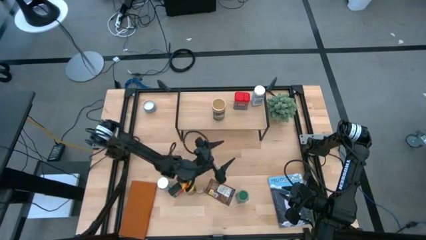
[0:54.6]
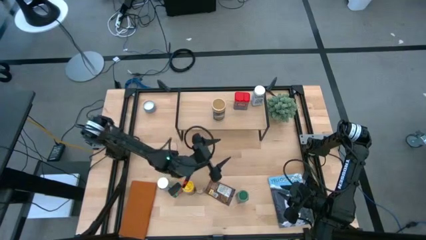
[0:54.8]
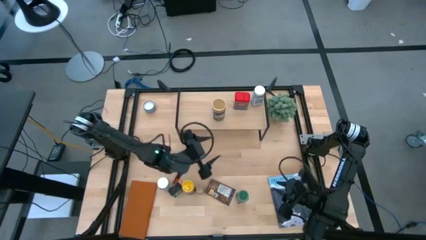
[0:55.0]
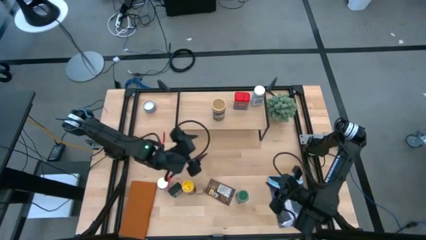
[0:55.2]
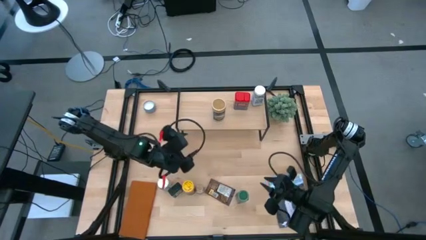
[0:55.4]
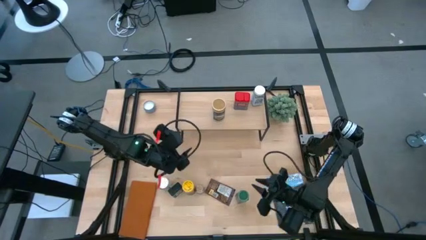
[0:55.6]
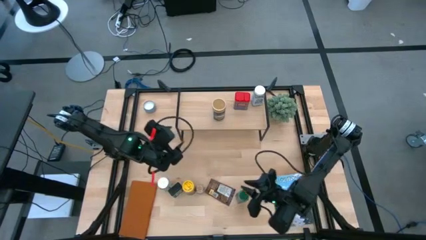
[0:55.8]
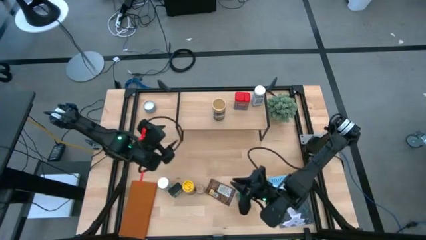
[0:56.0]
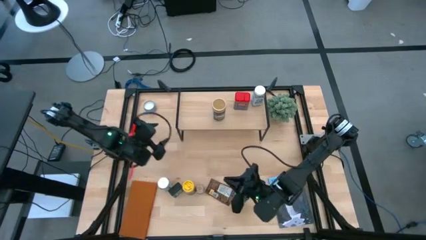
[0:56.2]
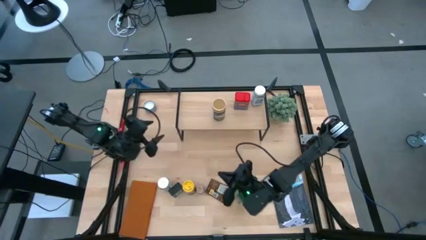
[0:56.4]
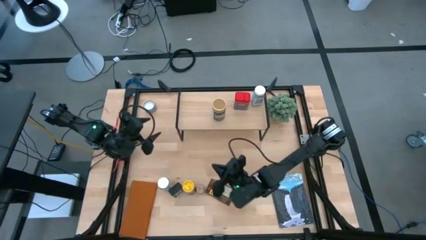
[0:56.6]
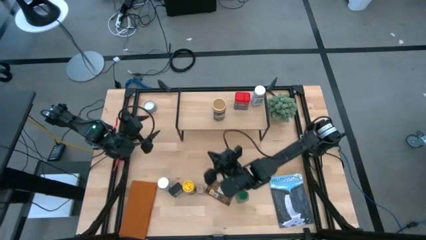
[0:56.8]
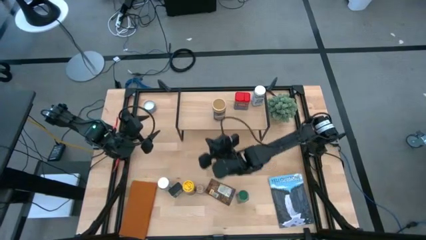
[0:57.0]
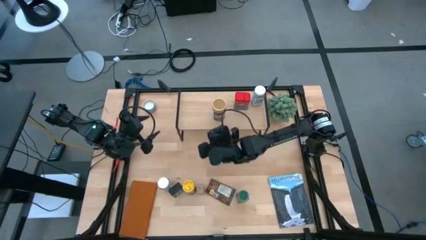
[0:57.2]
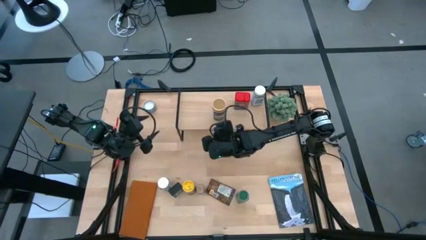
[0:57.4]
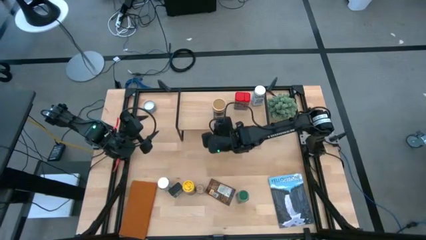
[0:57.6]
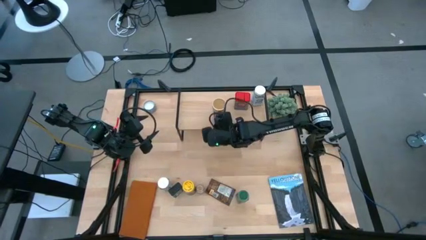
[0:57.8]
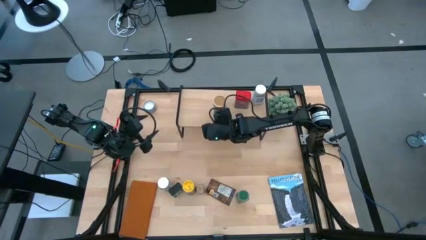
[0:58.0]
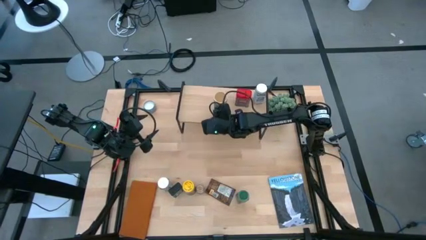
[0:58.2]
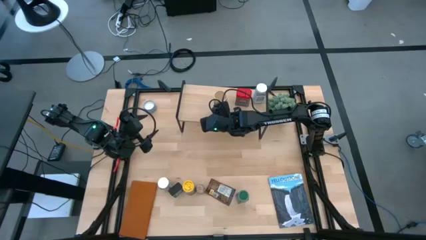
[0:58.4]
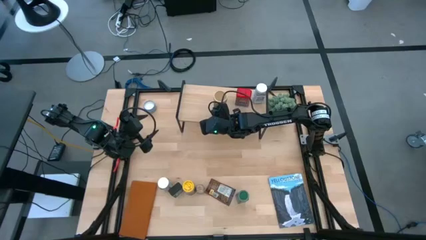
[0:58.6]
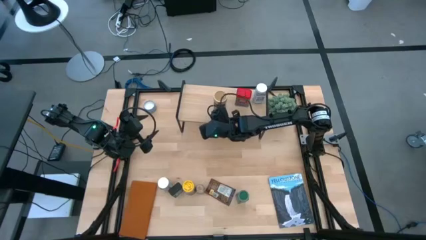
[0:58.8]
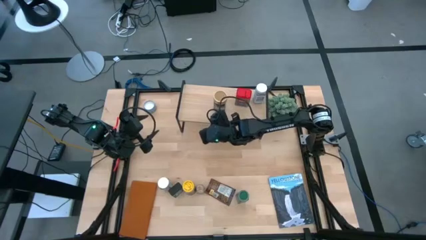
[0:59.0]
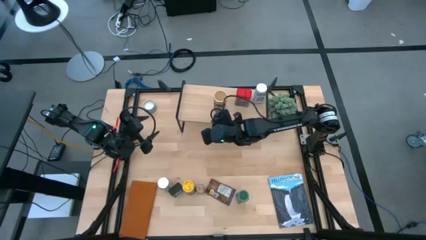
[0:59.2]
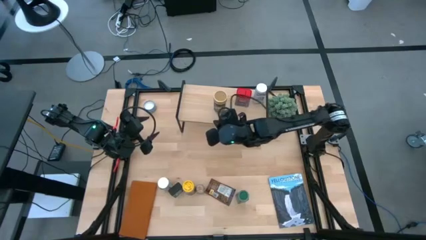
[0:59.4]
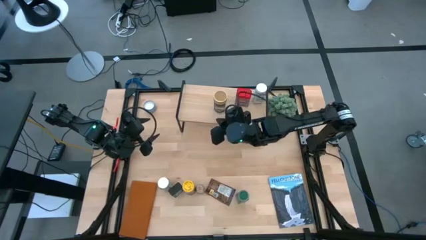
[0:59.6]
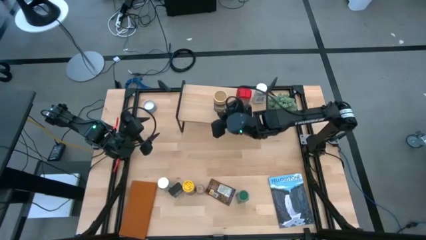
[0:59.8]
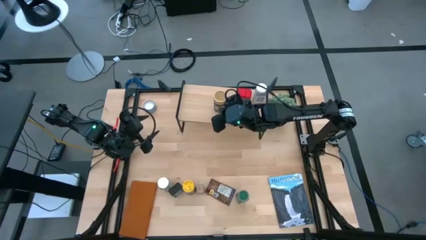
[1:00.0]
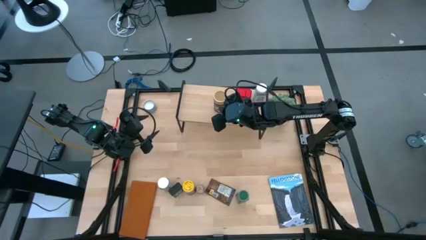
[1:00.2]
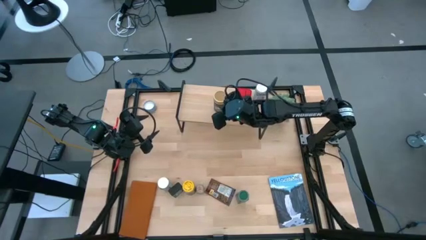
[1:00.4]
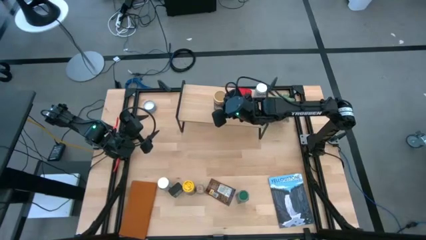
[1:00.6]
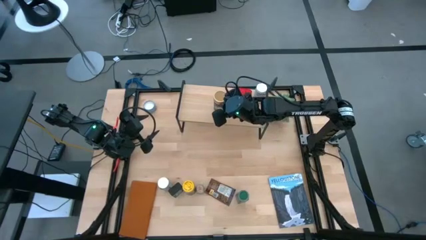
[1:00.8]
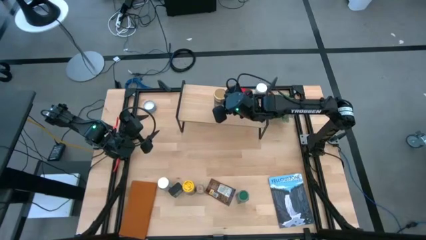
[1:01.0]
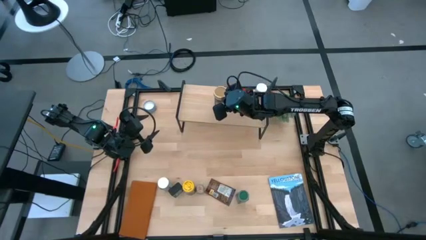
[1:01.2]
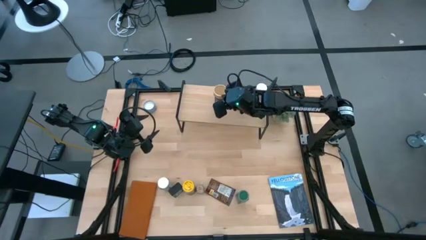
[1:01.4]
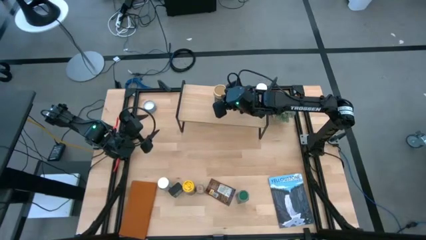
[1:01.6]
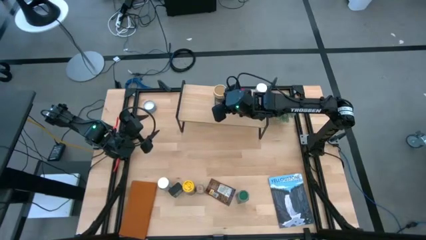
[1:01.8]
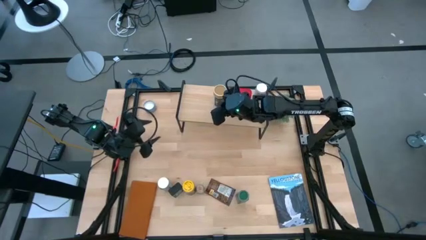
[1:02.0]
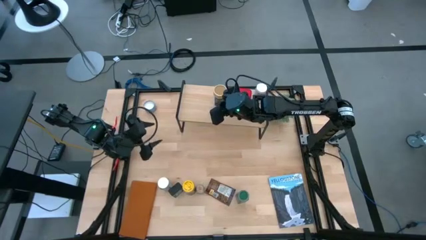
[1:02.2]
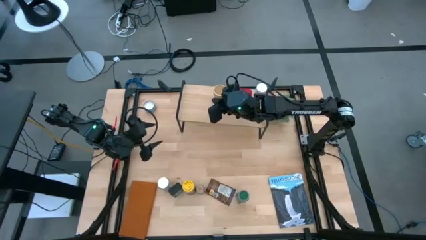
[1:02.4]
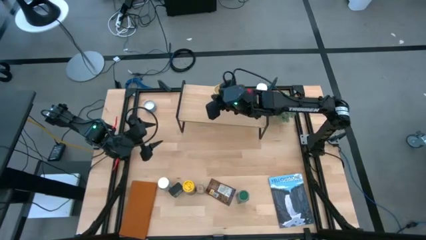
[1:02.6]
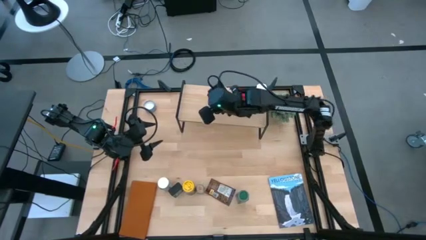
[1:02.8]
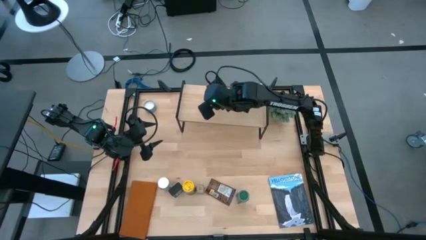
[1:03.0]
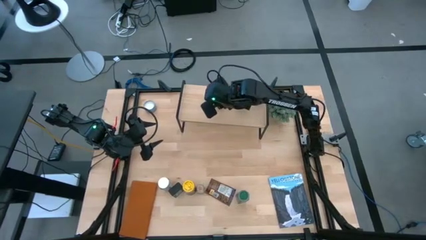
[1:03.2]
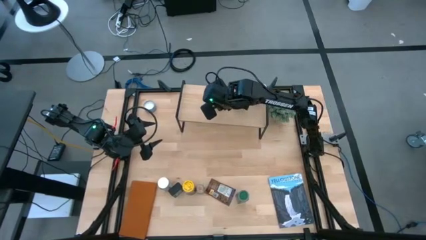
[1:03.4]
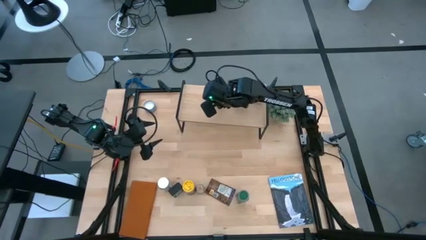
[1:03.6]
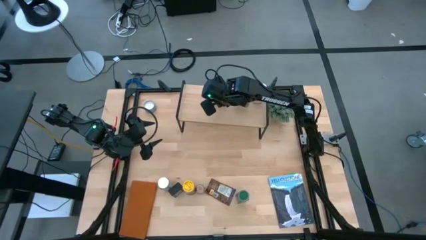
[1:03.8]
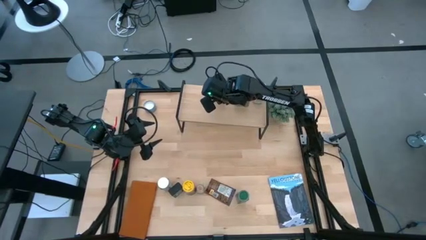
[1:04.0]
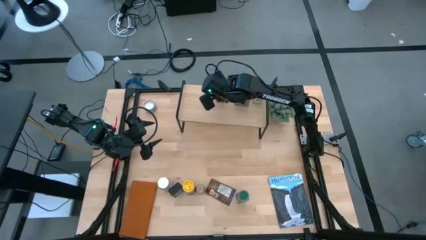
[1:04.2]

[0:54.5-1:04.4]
Task: Shelf spices
Put the brown seasoning bottle on the shelf

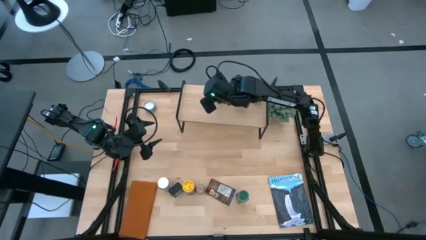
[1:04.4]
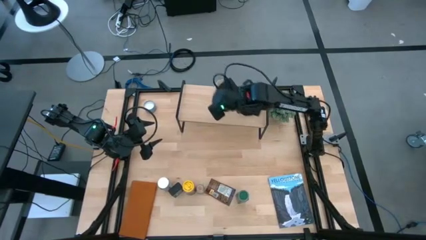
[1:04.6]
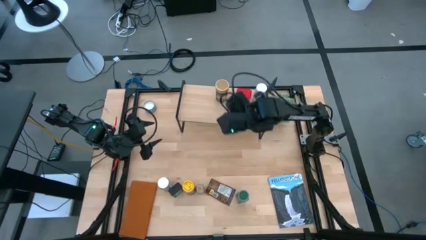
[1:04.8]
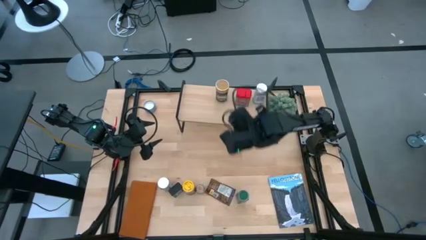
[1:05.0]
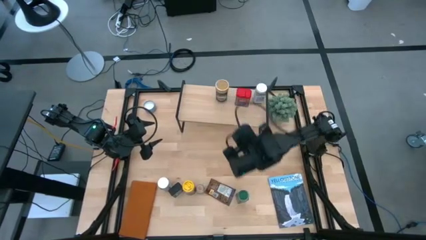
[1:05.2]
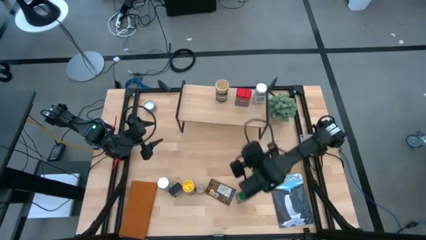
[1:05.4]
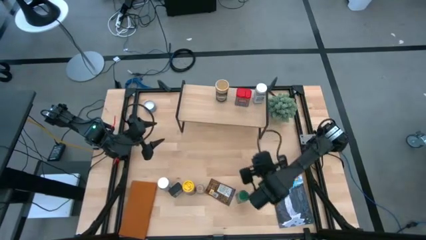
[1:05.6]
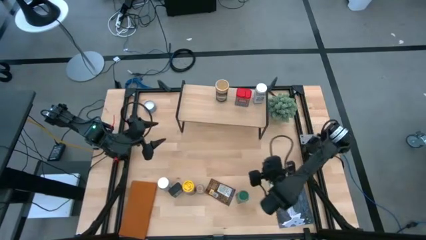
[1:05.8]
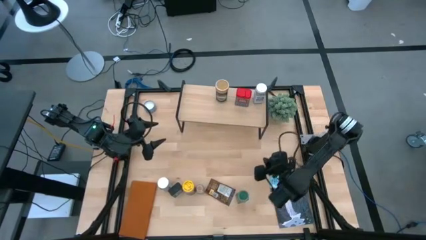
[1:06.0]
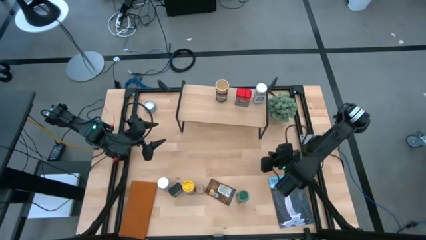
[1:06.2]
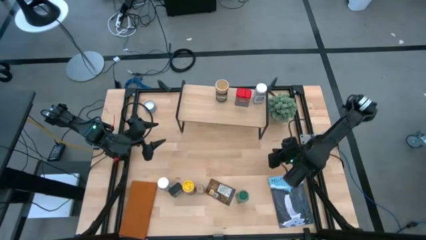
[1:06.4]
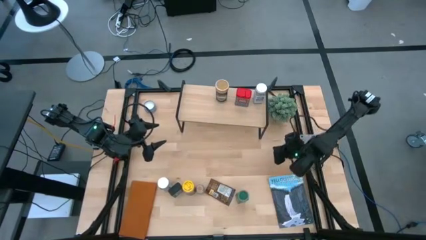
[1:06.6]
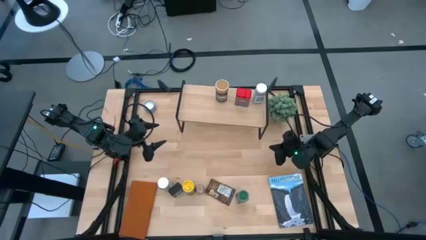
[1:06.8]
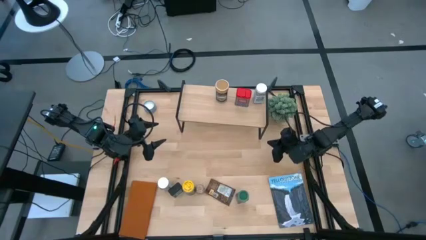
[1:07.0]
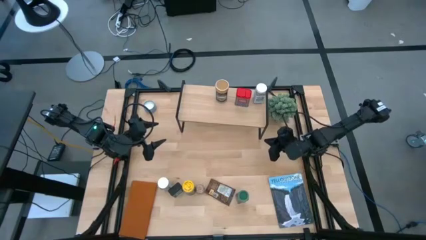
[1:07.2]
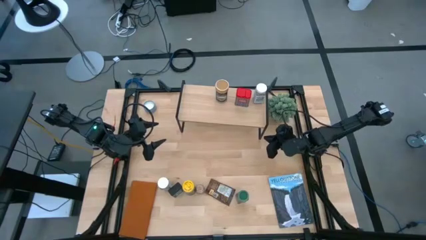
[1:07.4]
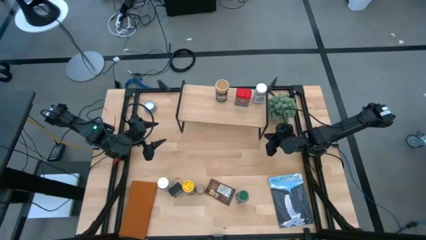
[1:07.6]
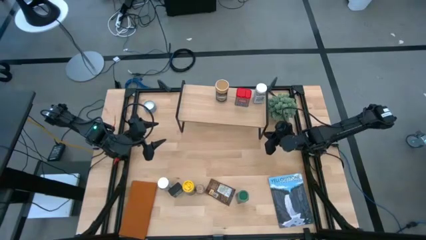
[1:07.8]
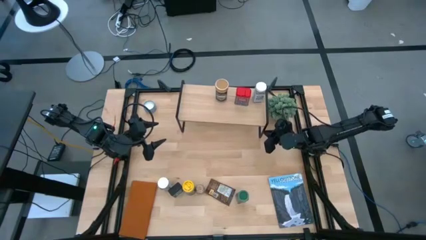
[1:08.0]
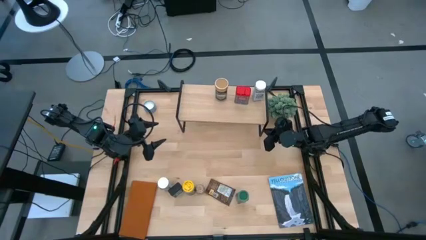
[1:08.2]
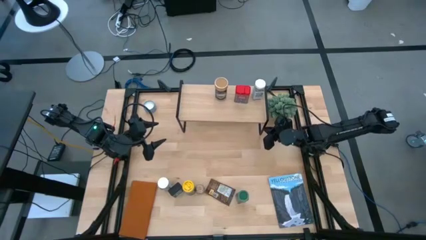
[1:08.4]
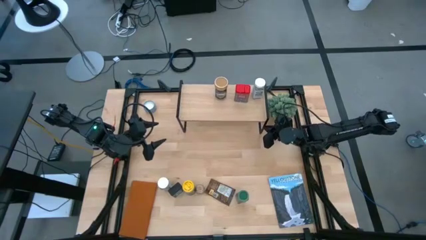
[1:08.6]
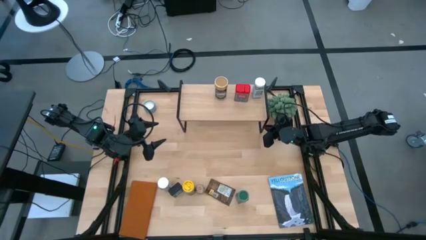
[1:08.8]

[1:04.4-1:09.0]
Adjust the shelf
